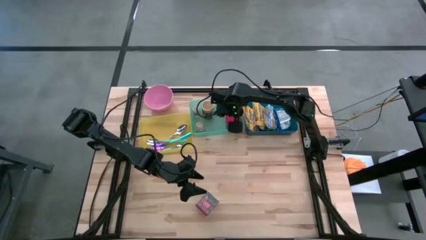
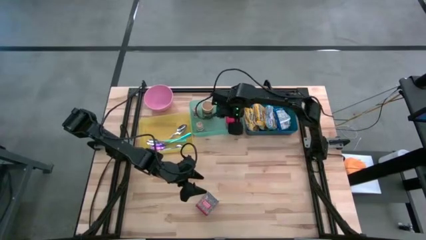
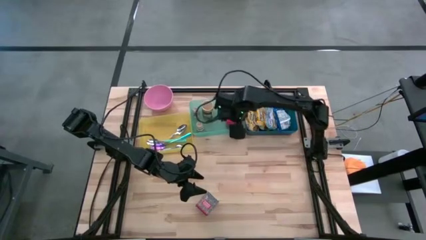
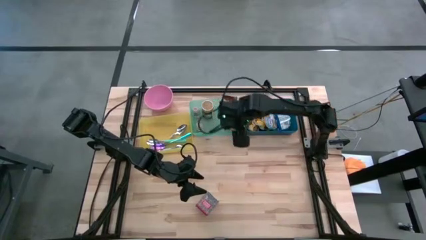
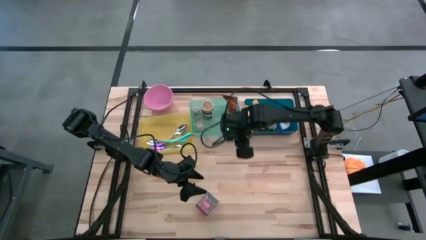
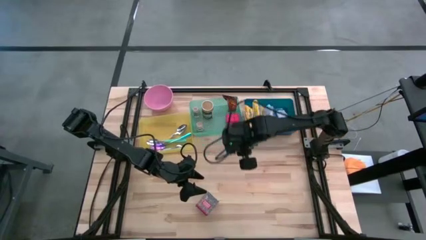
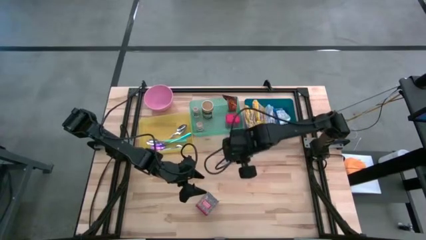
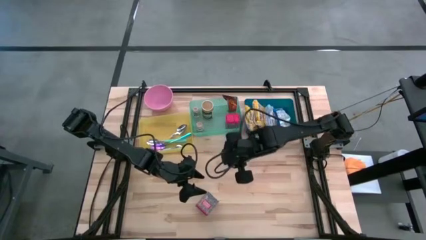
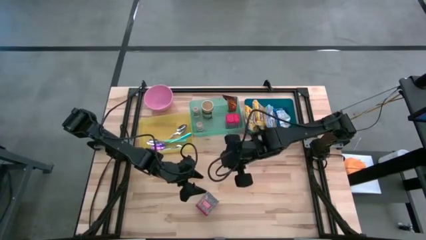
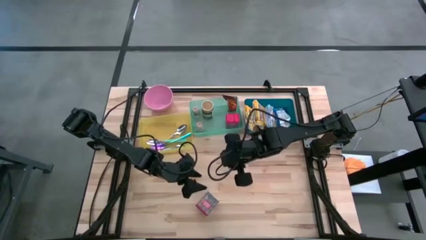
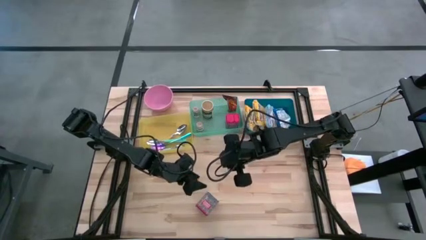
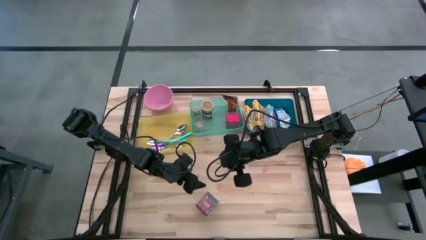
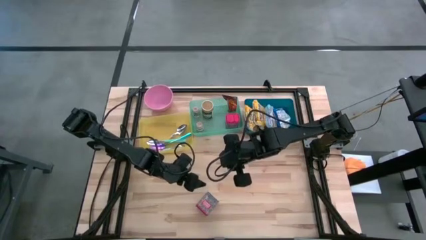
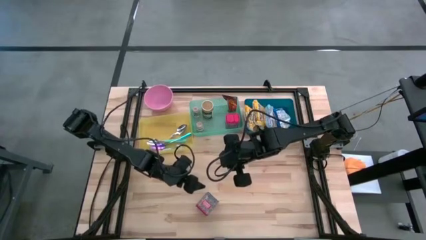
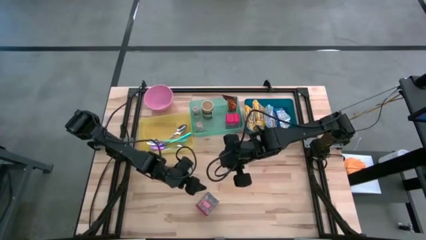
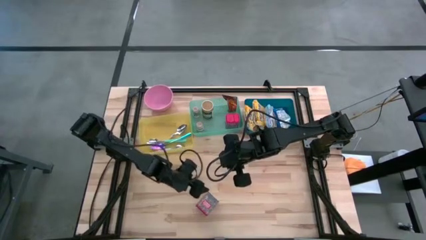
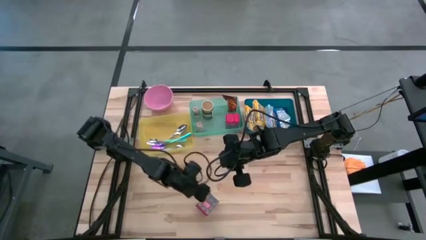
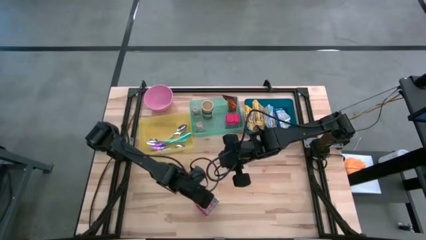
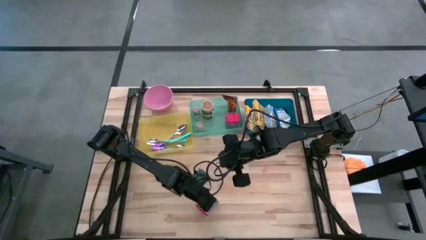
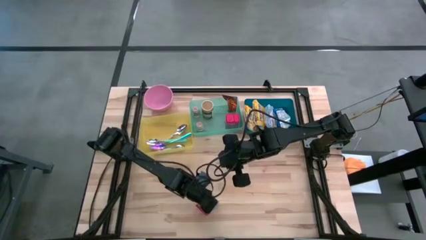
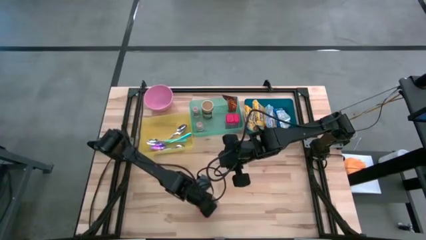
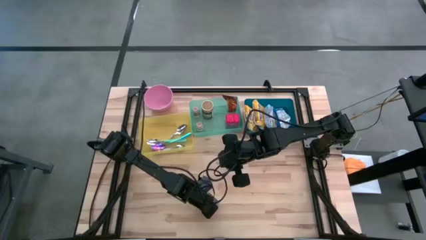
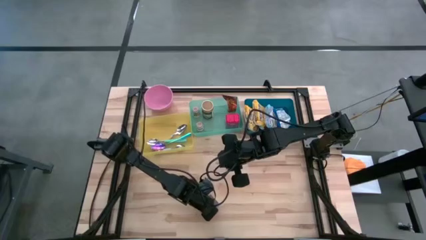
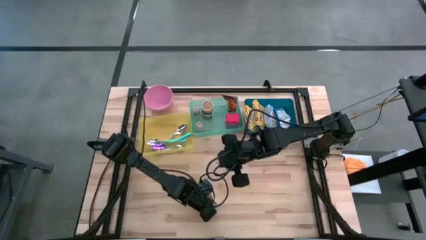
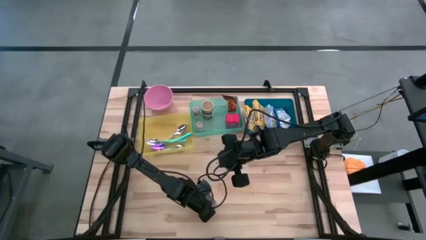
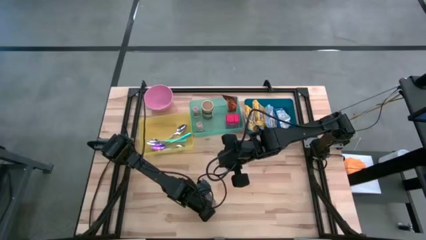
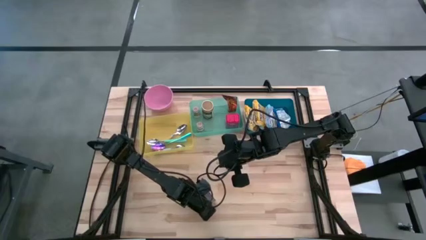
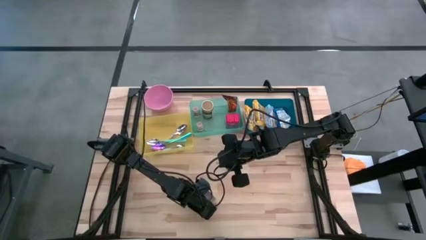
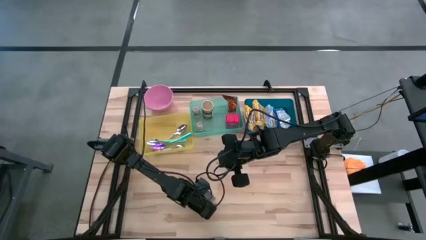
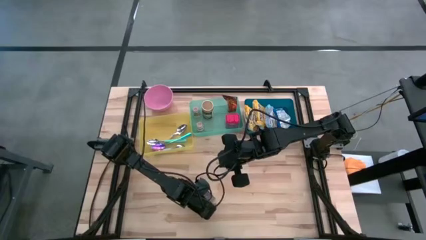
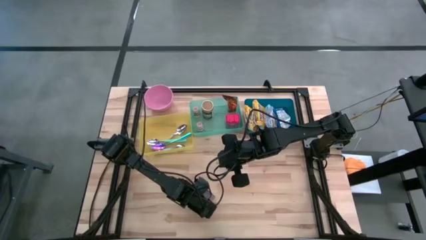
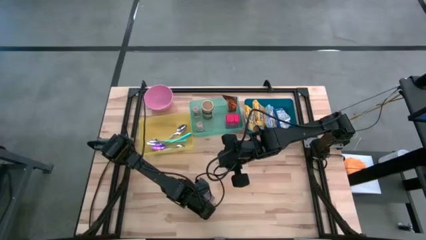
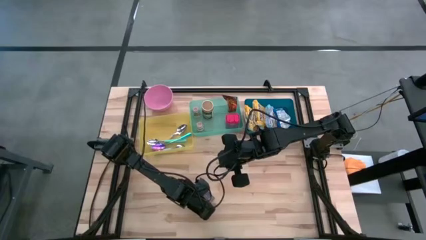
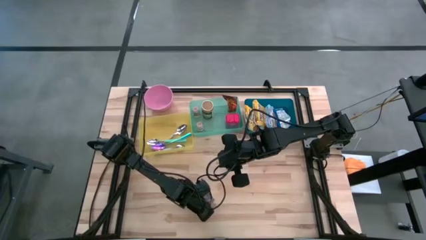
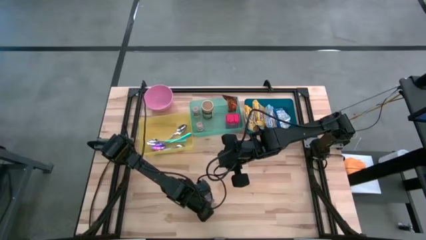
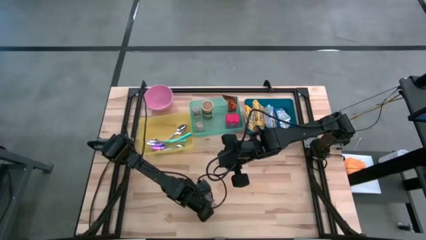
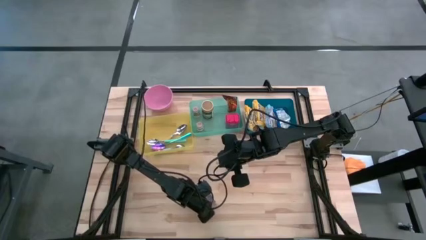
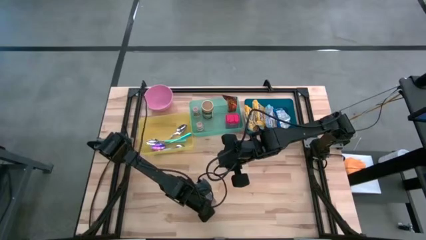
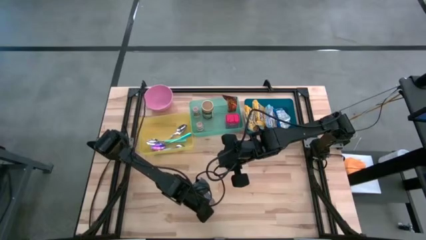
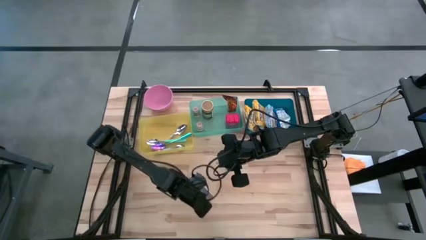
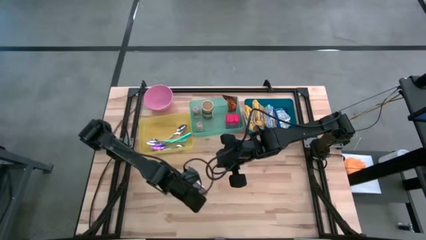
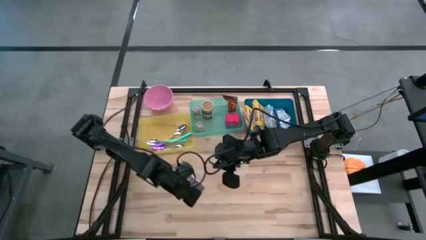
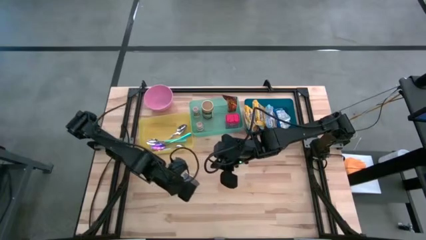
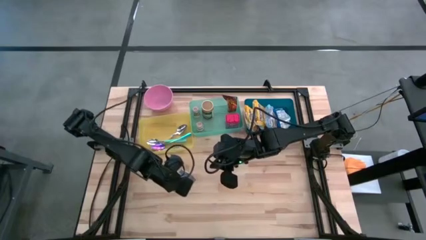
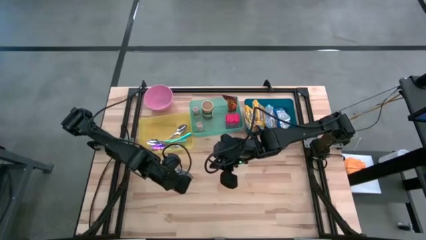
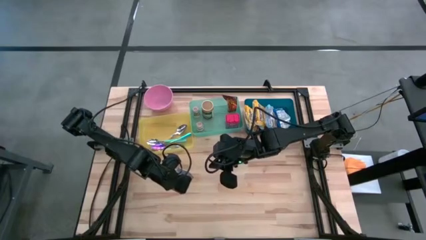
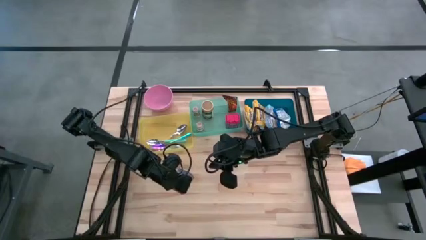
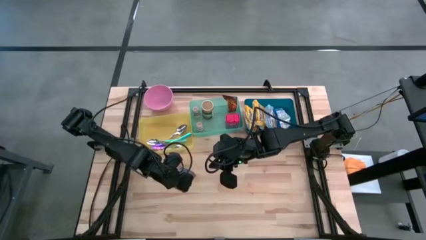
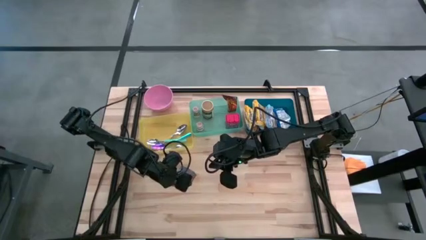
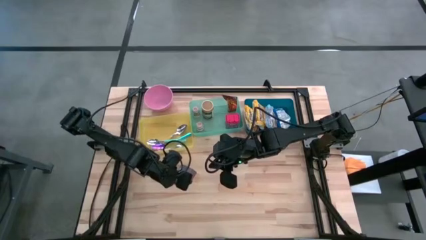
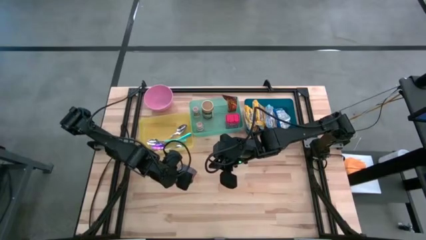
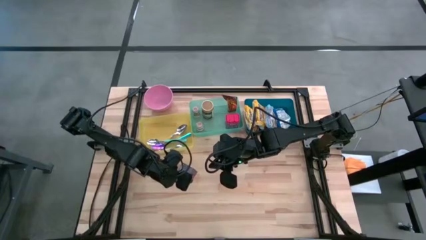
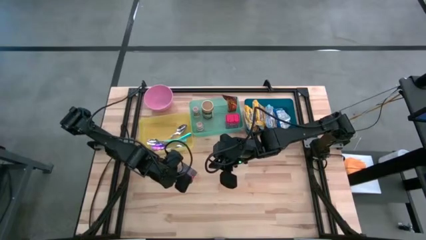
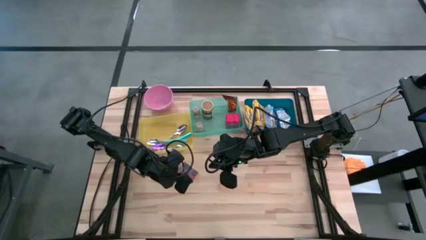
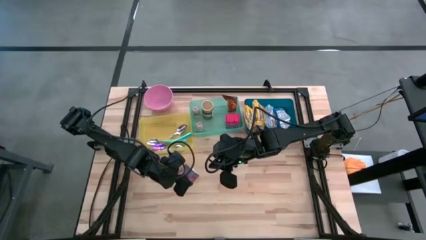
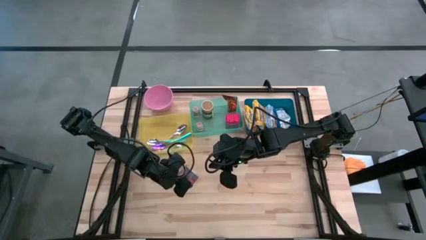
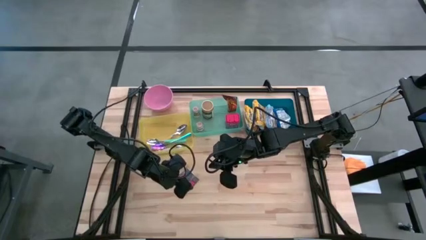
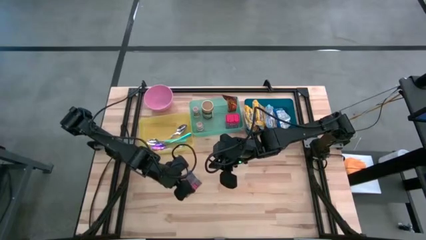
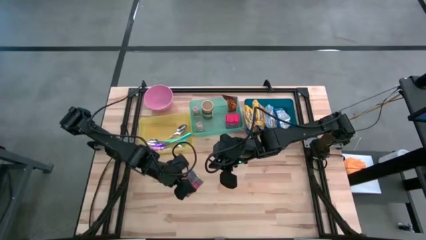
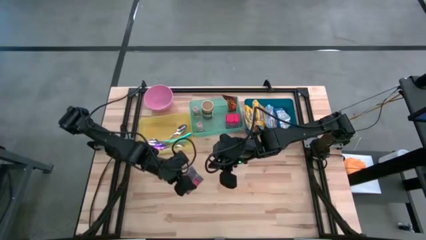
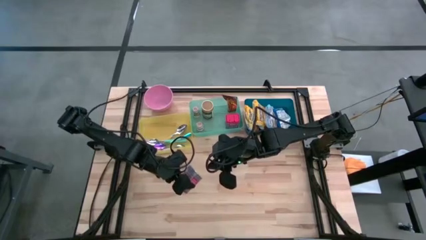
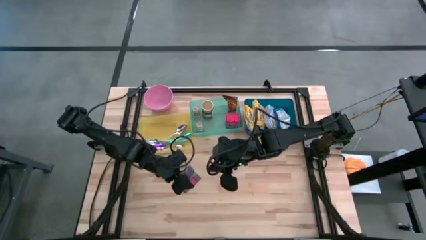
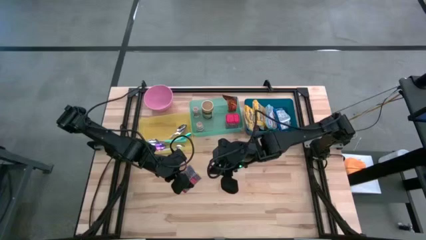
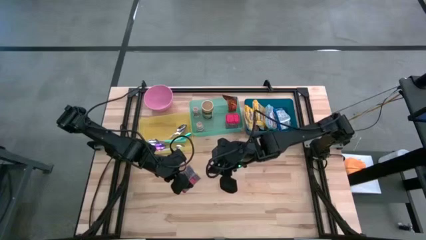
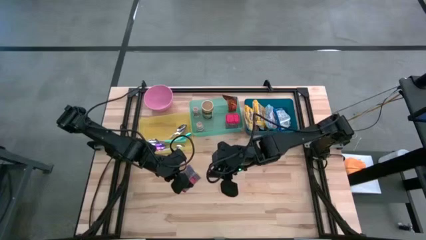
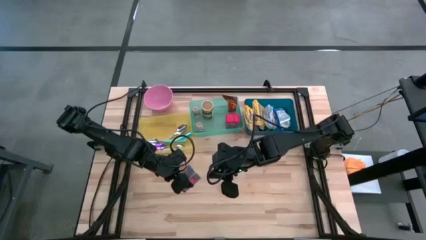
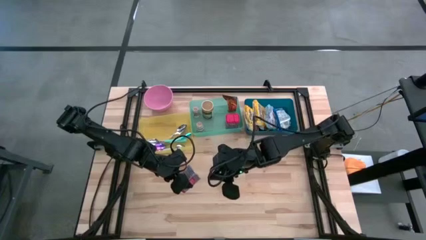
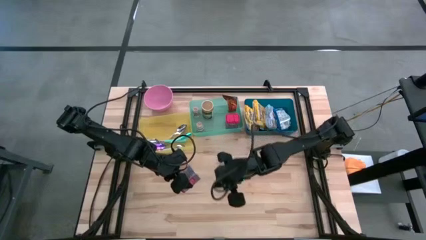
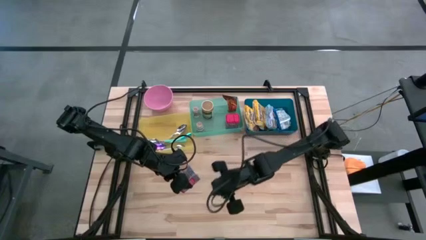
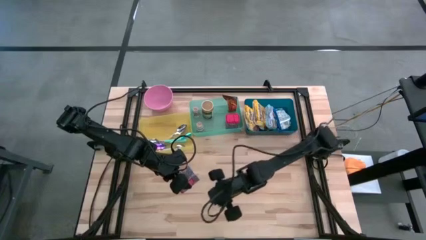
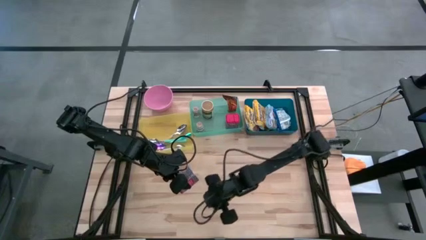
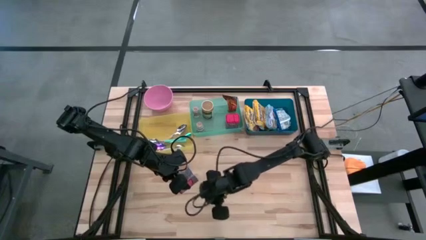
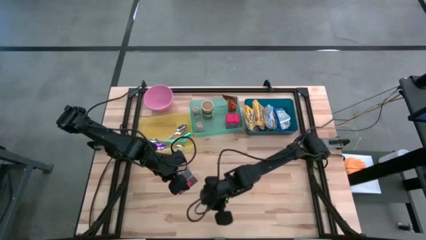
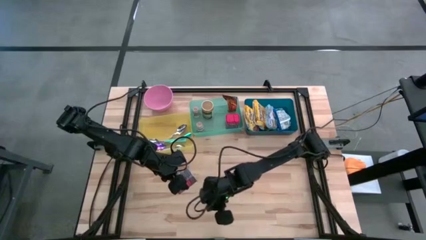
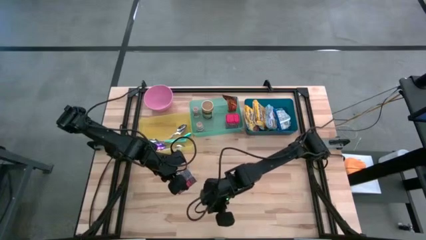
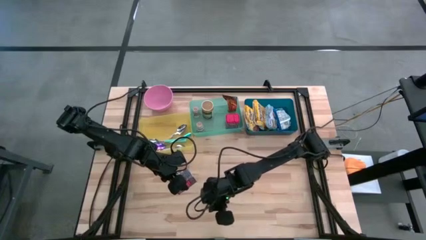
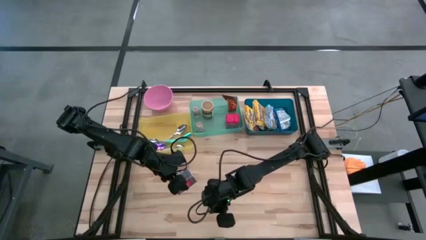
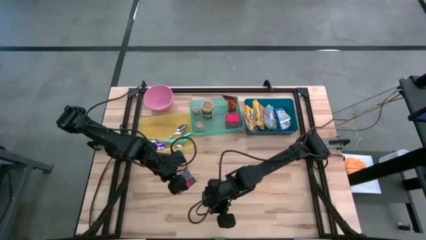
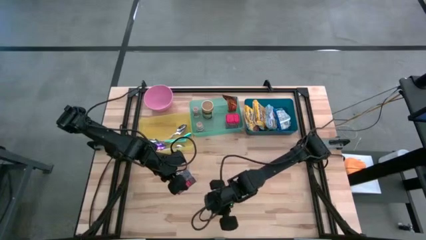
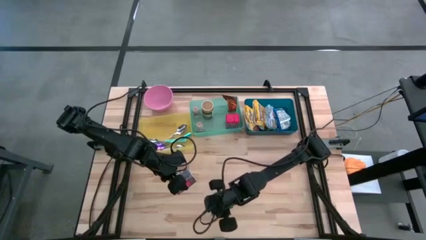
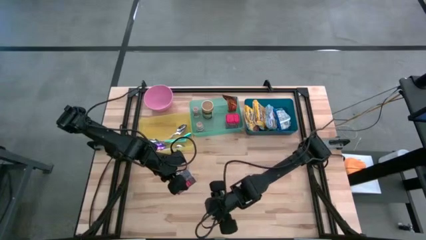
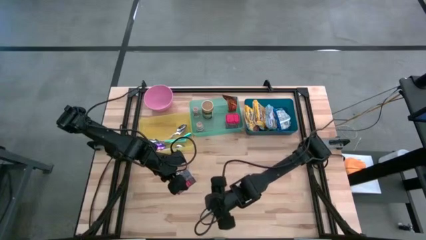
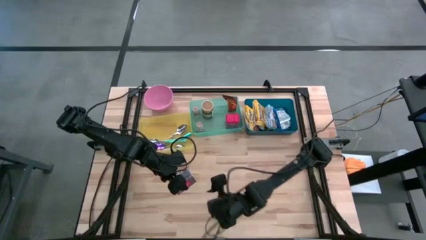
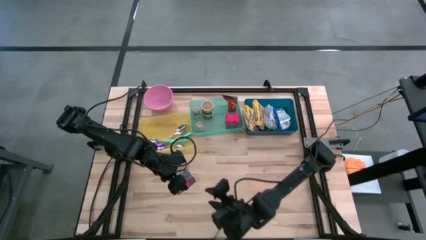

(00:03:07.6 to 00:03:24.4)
Put the red seasoning can into the green bin
